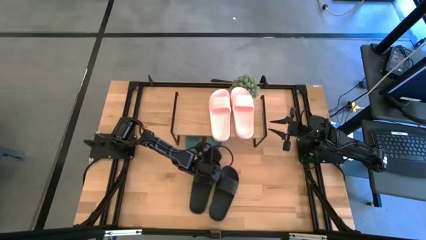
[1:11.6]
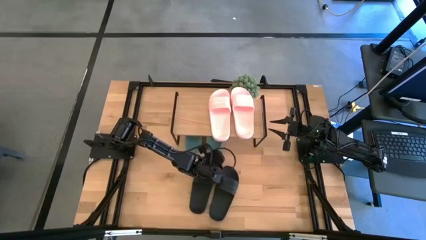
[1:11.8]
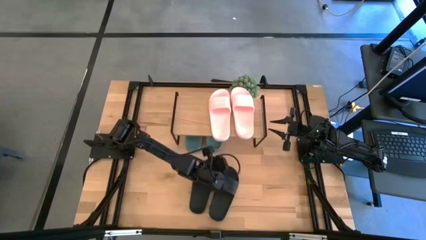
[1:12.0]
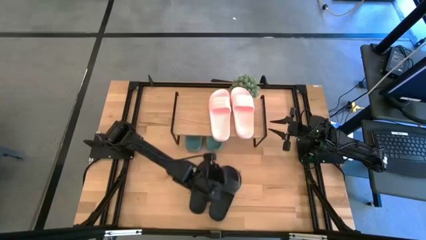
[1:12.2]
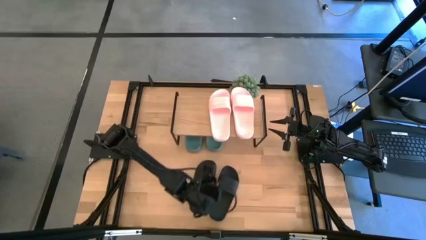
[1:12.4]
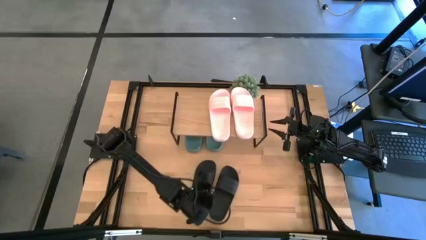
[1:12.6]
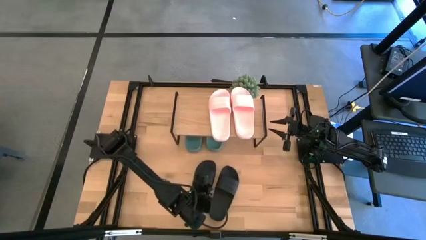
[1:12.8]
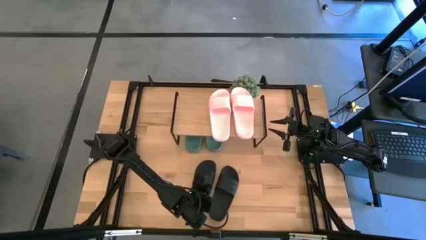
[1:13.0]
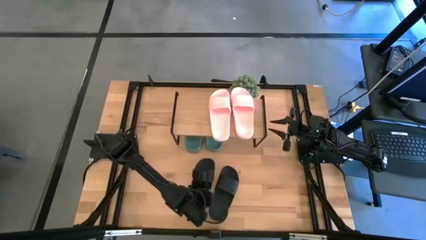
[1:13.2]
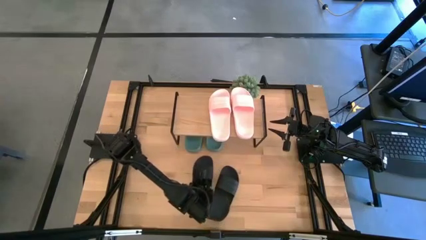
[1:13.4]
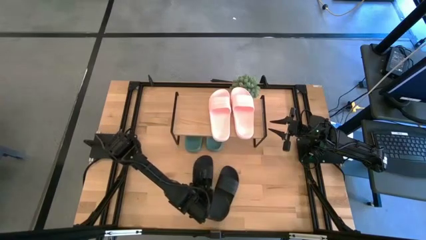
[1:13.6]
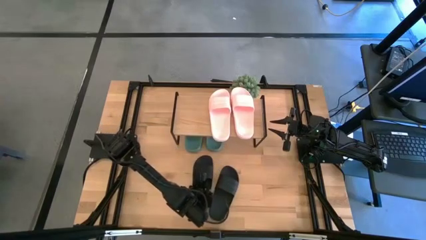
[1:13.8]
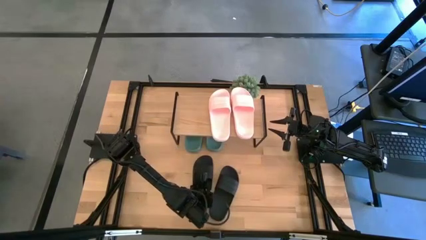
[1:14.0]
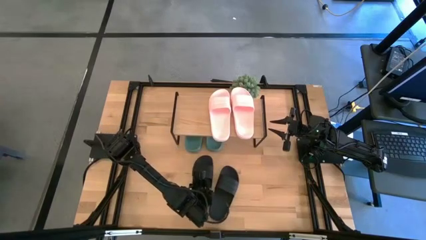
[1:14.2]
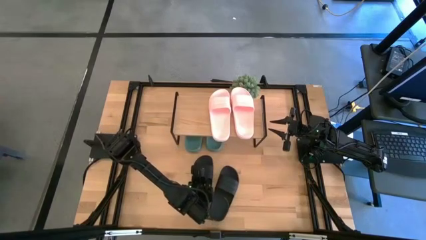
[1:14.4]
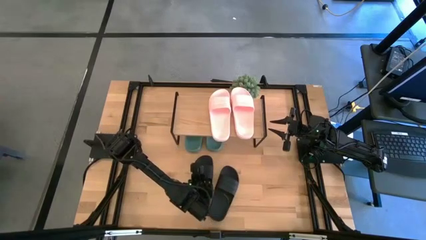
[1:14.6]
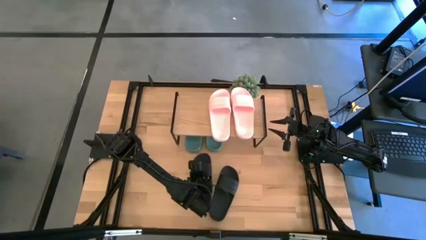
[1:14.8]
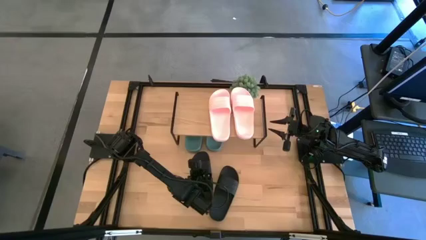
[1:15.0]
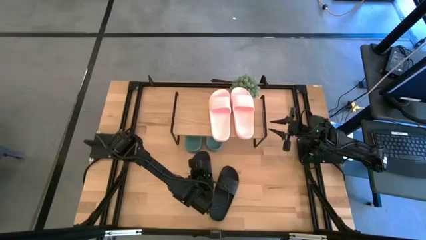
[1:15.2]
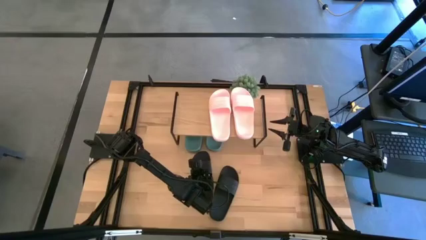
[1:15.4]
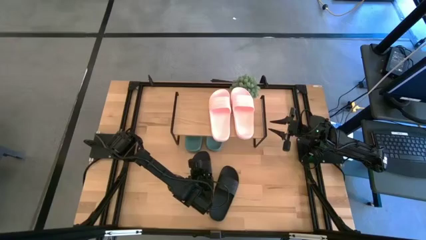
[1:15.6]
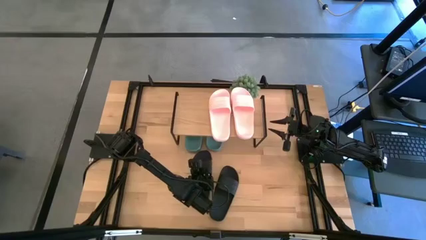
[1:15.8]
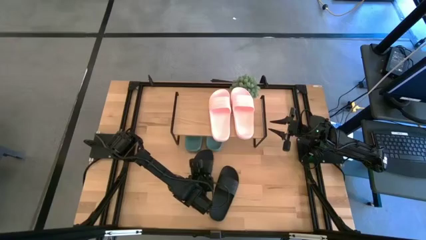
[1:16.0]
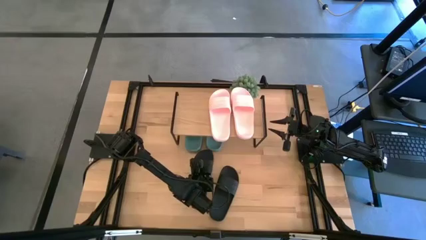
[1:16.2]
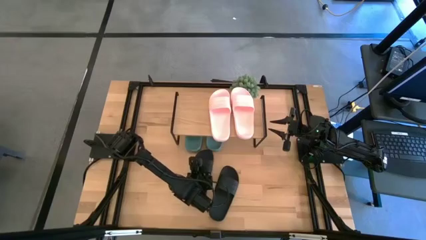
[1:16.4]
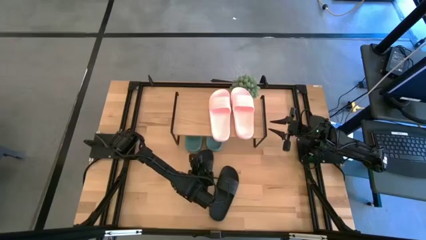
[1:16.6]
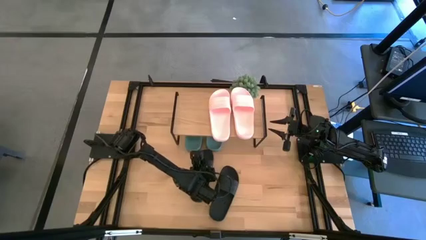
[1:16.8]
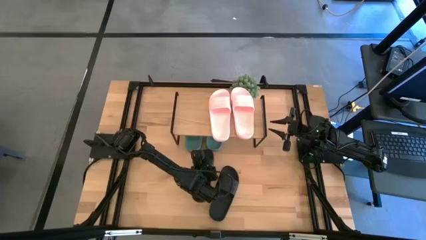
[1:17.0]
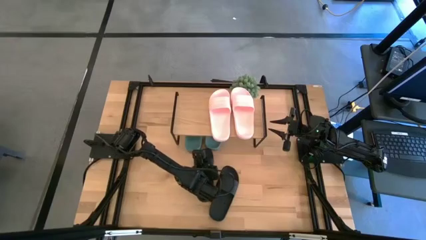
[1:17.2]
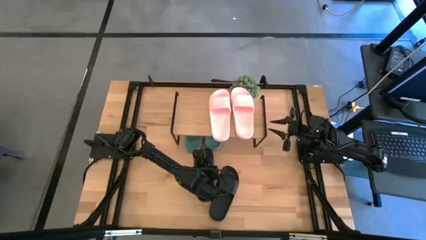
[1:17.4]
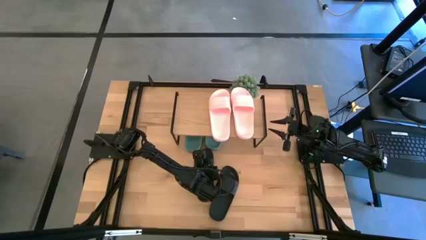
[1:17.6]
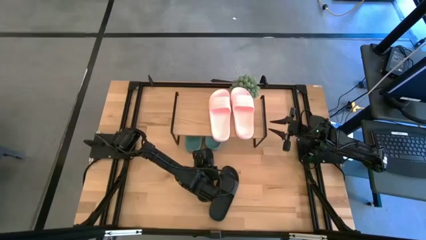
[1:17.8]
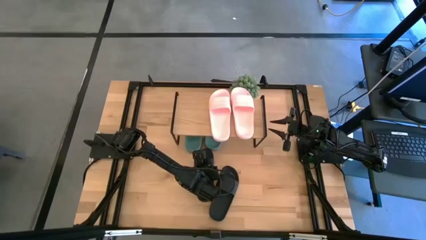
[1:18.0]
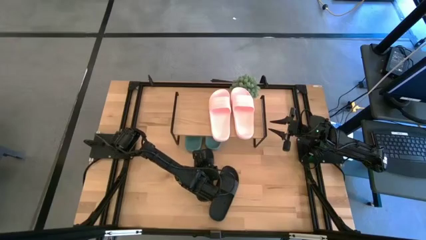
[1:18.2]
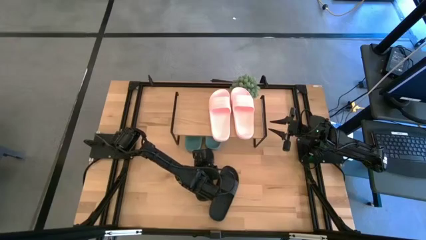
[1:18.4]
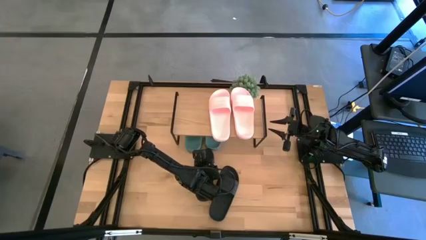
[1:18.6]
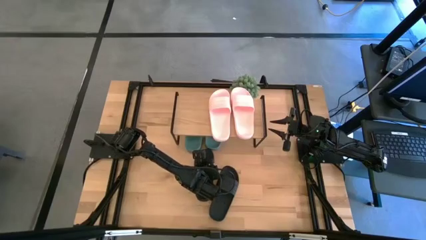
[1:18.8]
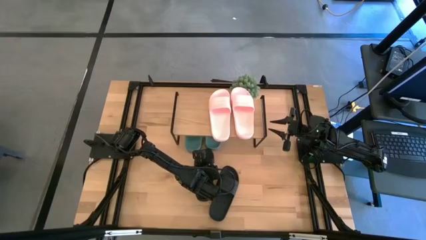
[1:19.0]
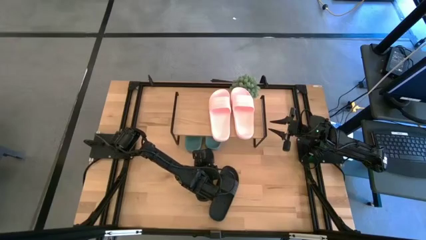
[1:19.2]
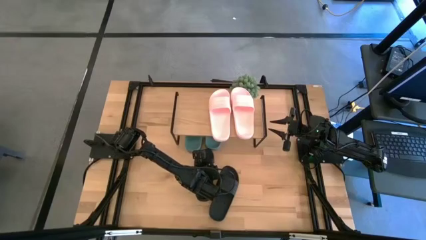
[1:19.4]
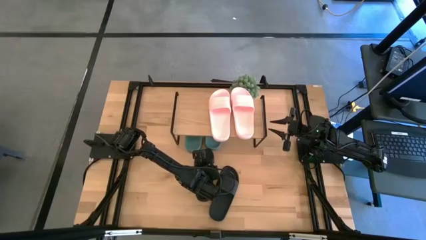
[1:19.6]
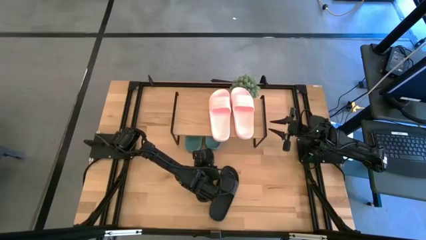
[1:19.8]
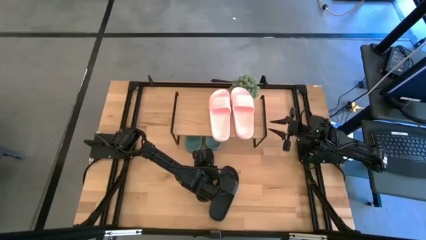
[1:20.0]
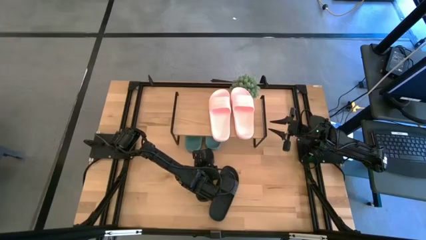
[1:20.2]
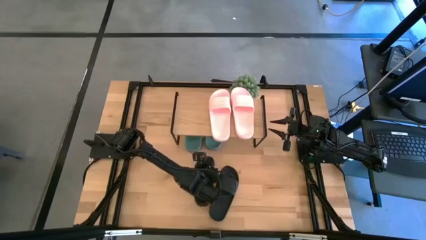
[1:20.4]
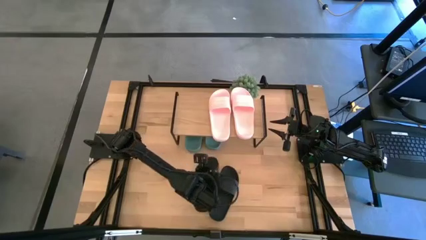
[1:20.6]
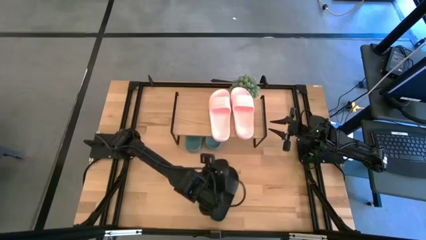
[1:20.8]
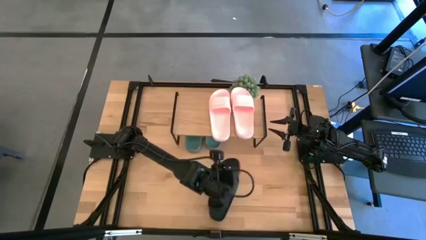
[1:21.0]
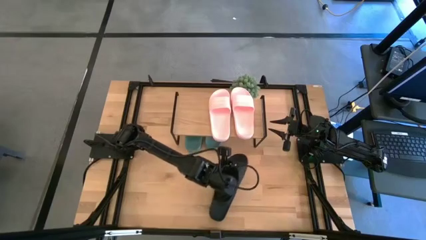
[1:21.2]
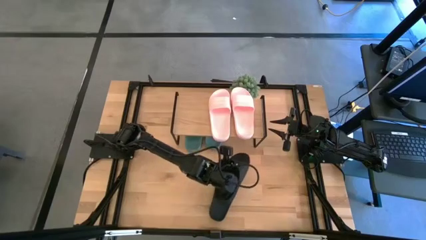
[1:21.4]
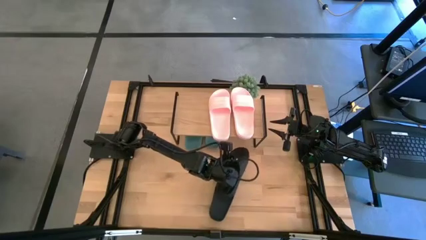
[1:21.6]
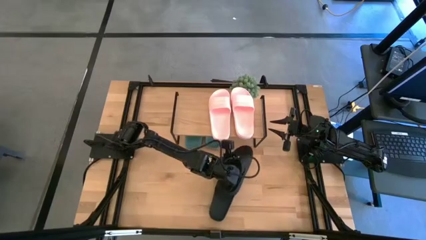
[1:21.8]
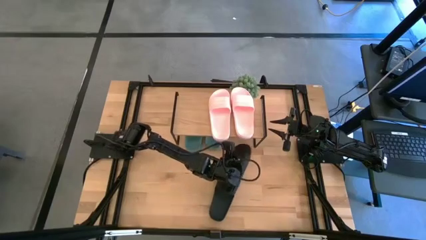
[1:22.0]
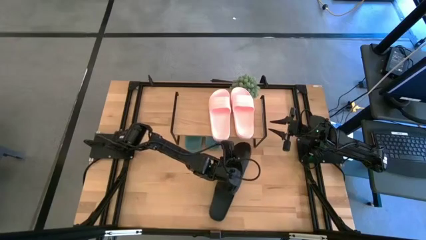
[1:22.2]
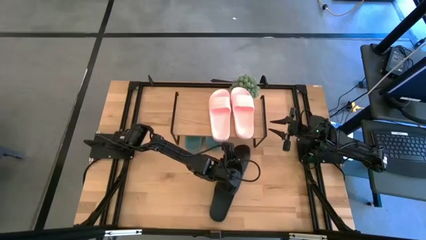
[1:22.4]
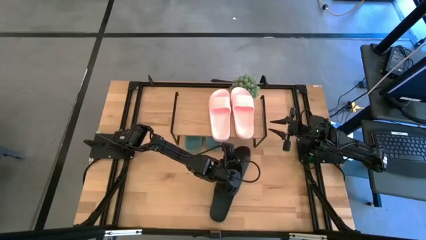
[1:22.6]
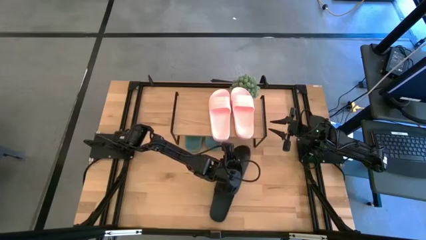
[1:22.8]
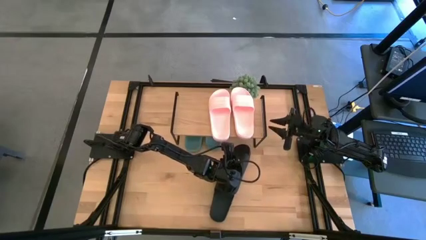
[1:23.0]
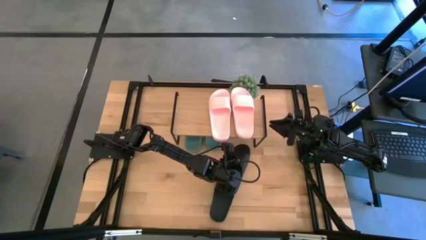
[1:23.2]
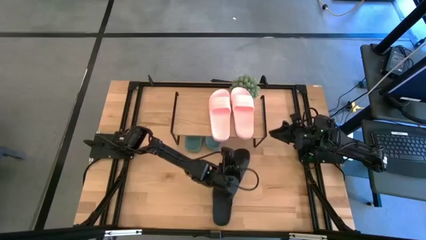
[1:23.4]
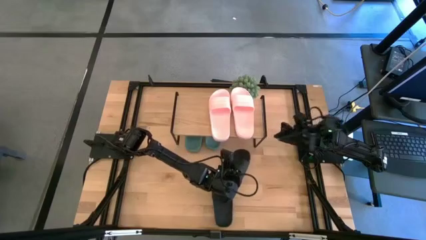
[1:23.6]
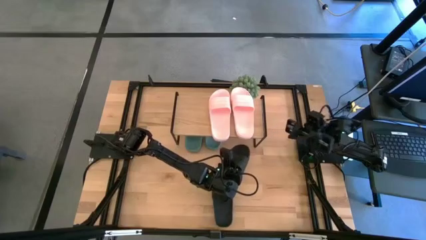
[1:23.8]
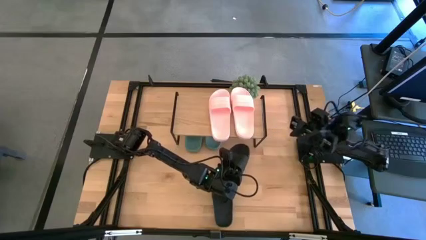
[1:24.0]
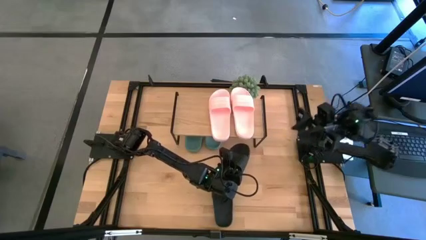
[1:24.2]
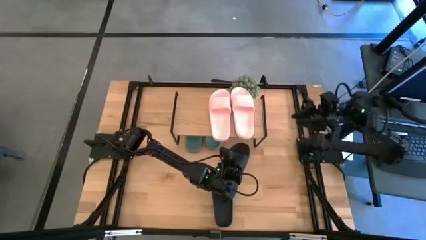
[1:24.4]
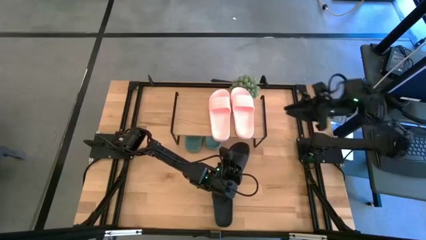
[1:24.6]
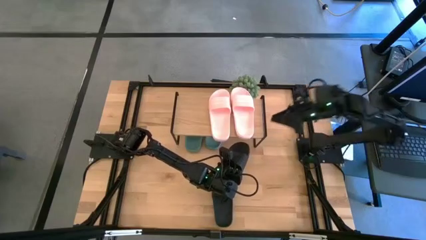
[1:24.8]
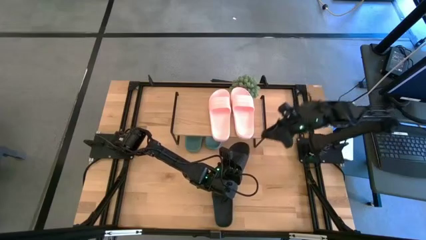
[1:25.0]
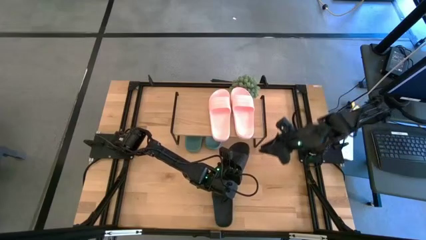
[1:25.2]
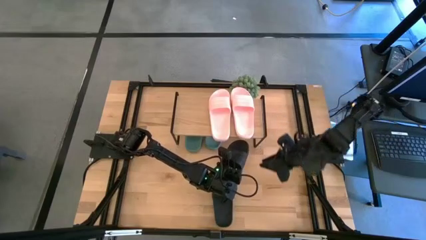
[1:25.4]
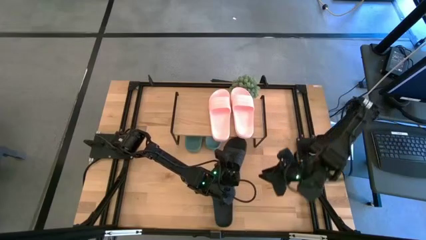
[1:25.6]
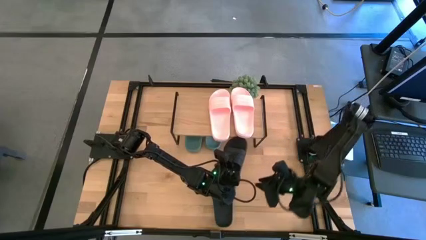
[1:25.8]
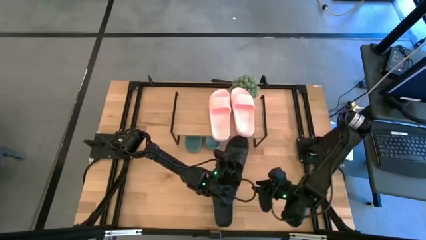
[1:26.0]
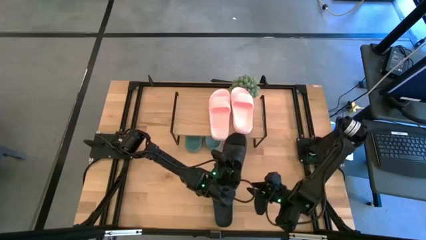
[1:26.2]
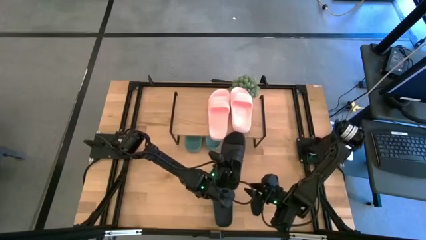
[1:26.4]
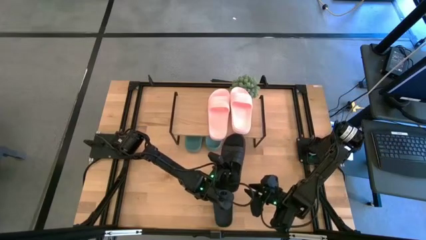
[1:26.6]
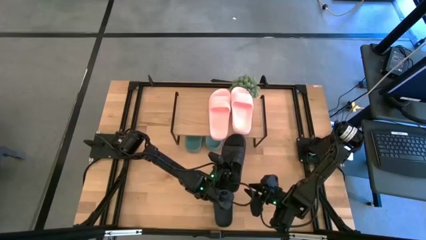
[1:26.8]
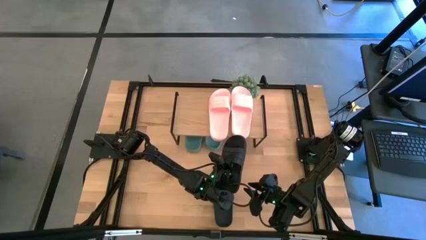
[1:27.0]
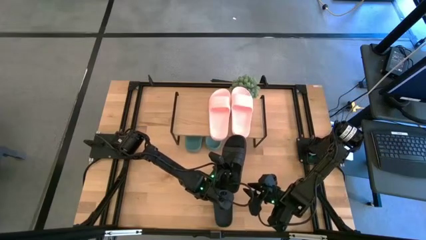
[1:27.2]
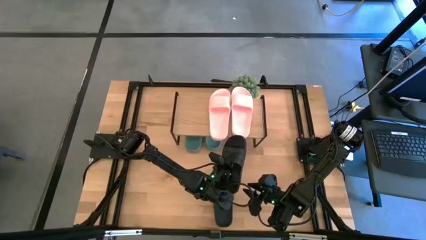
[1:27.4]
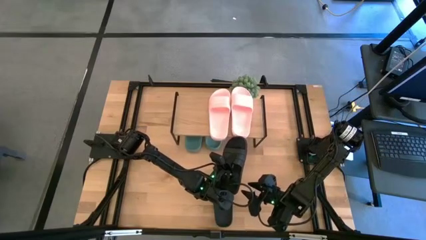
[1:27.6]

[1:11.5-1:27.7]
Task: Pick and place slides into the shelf
Put the left black slide under the shelf
